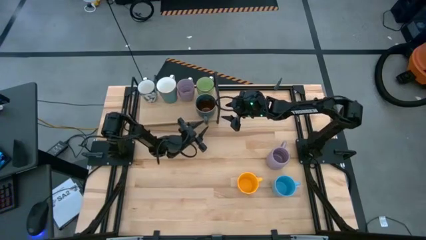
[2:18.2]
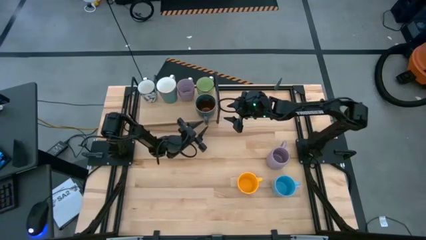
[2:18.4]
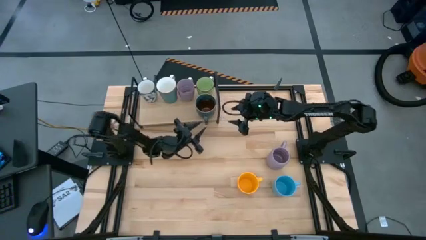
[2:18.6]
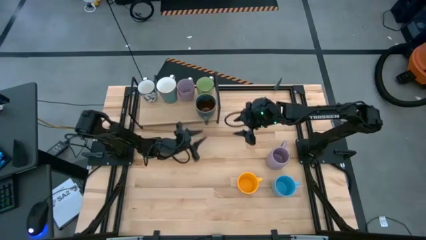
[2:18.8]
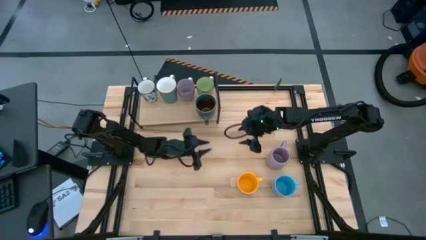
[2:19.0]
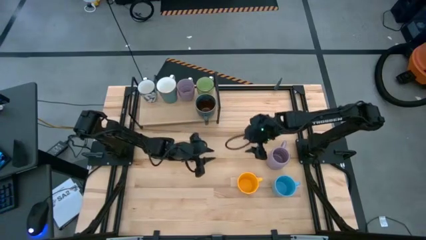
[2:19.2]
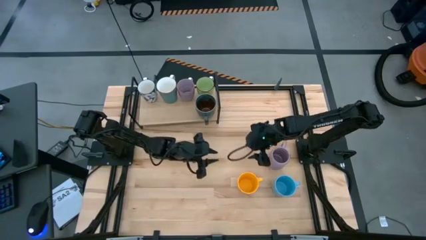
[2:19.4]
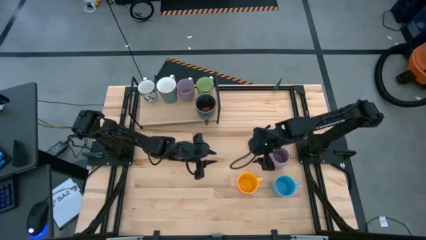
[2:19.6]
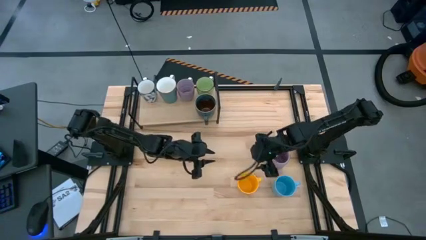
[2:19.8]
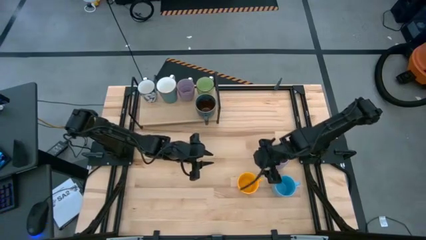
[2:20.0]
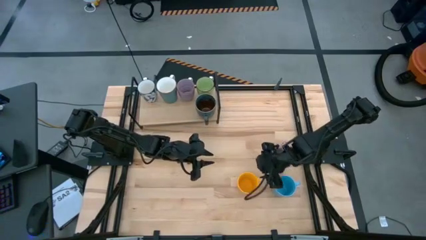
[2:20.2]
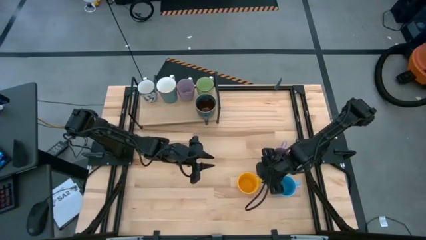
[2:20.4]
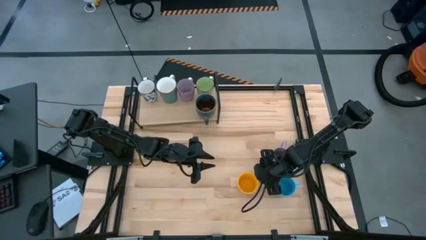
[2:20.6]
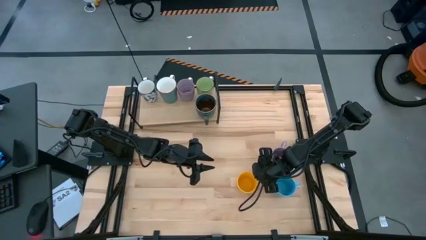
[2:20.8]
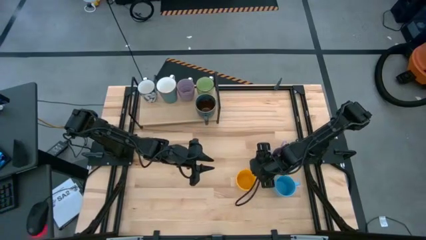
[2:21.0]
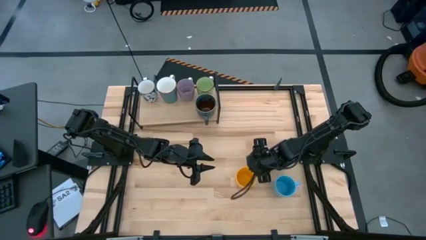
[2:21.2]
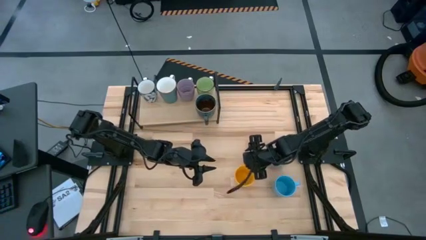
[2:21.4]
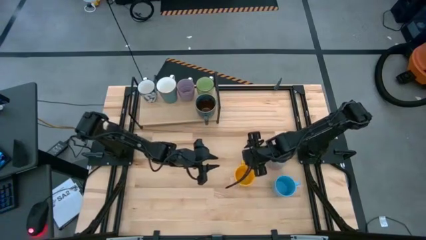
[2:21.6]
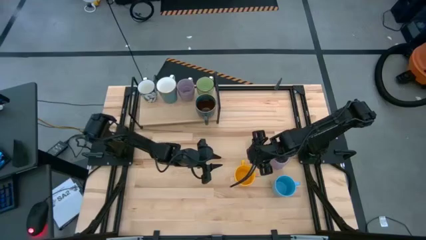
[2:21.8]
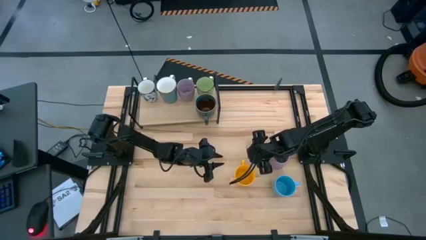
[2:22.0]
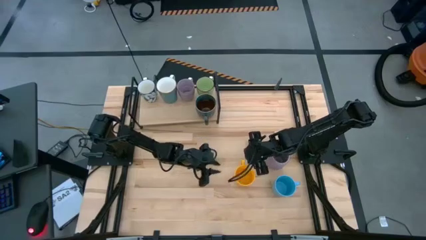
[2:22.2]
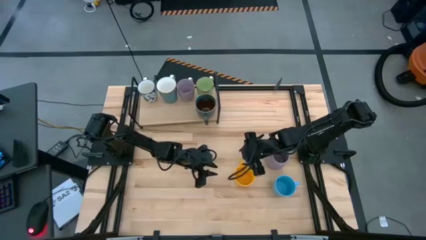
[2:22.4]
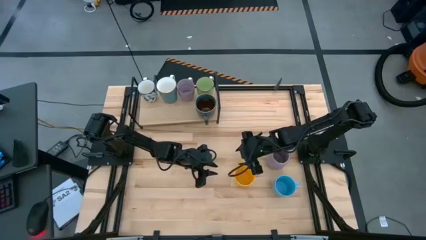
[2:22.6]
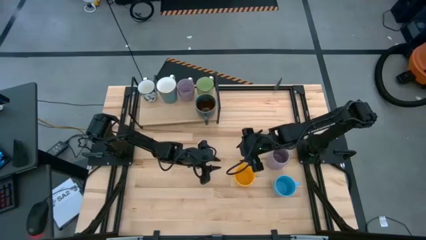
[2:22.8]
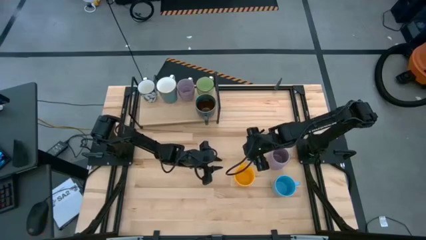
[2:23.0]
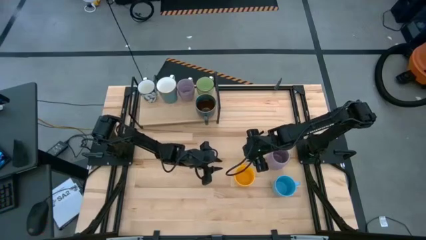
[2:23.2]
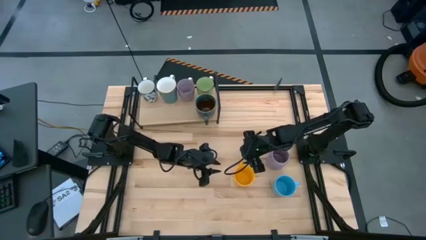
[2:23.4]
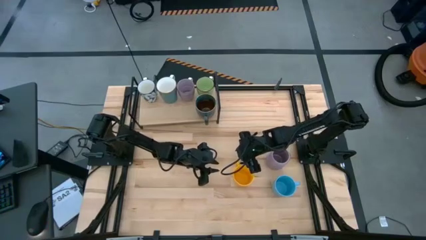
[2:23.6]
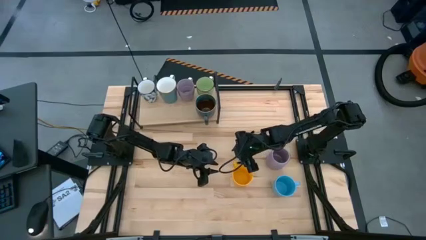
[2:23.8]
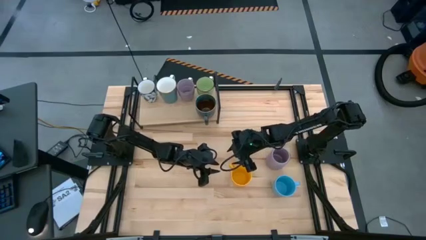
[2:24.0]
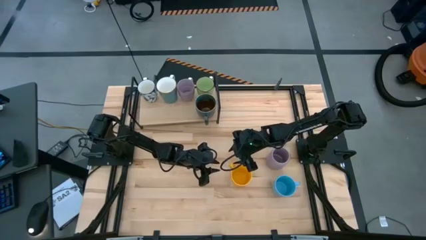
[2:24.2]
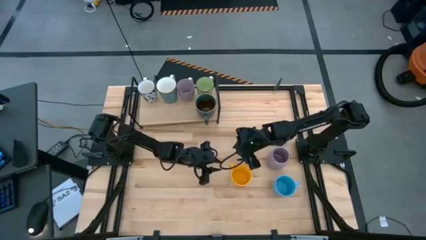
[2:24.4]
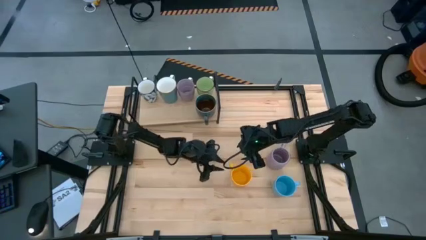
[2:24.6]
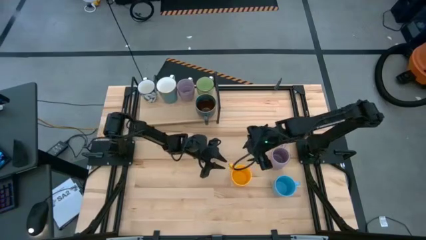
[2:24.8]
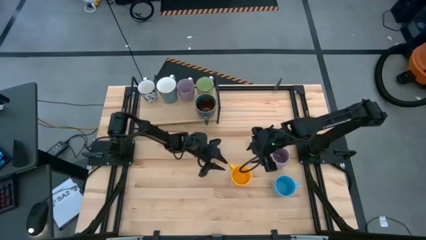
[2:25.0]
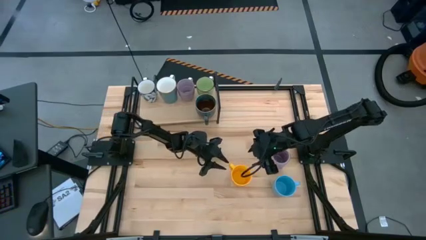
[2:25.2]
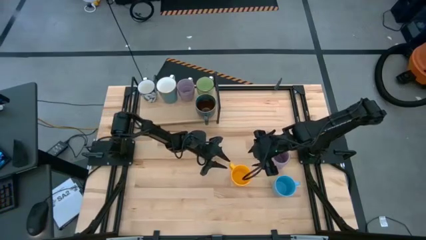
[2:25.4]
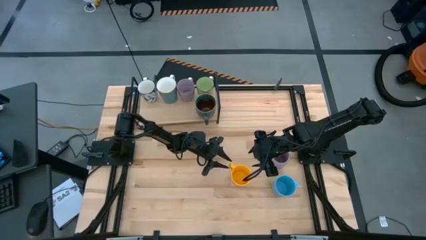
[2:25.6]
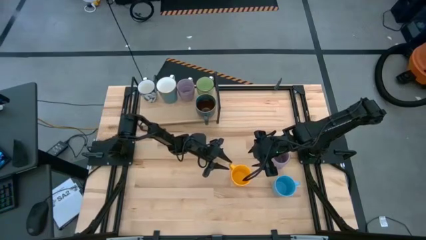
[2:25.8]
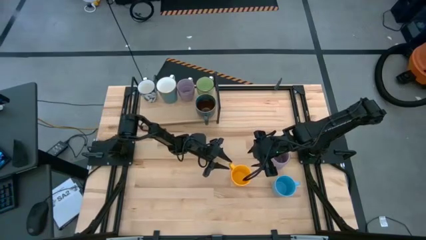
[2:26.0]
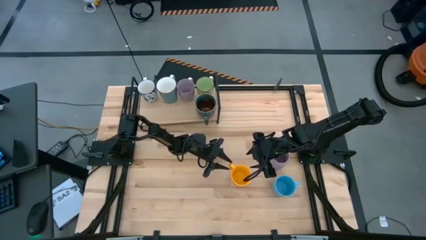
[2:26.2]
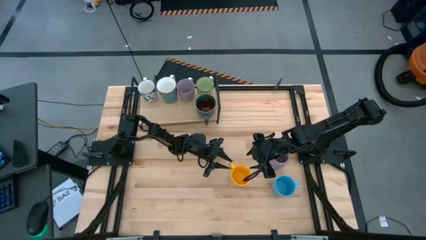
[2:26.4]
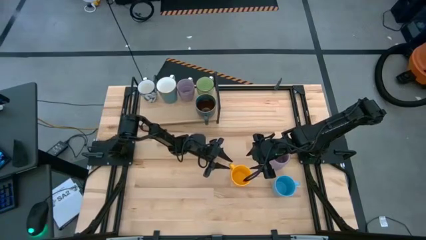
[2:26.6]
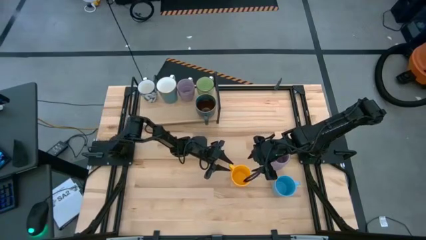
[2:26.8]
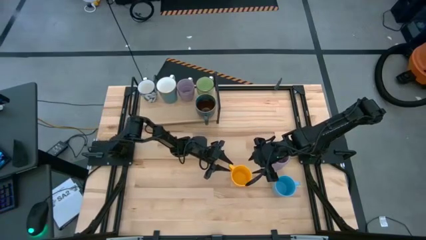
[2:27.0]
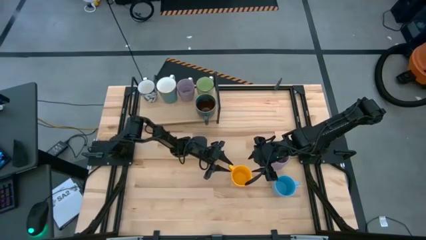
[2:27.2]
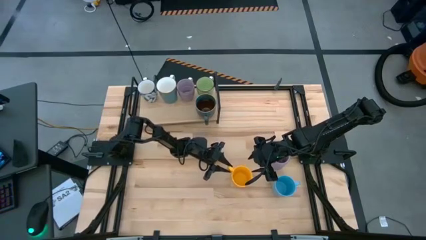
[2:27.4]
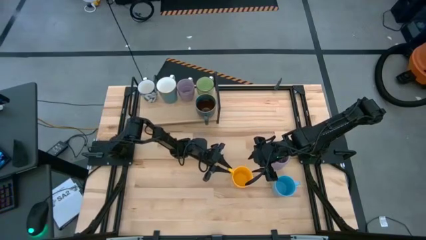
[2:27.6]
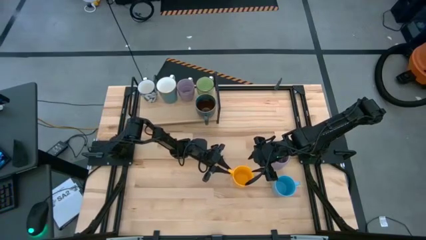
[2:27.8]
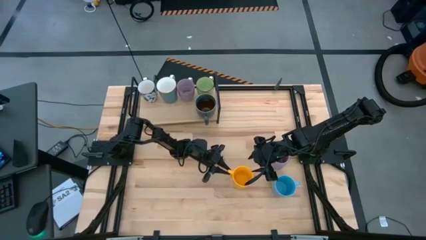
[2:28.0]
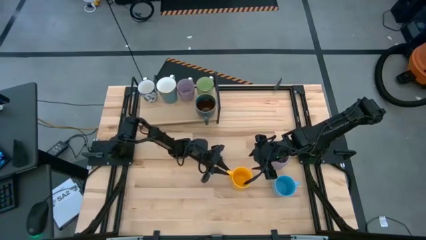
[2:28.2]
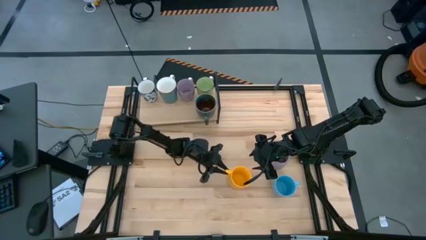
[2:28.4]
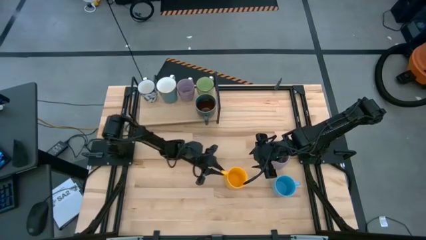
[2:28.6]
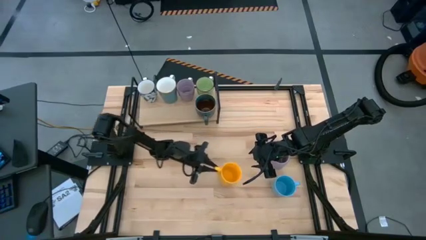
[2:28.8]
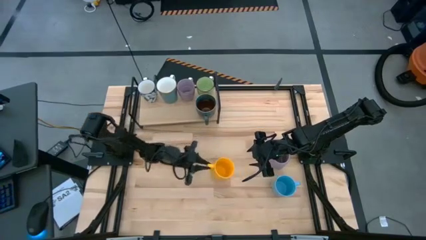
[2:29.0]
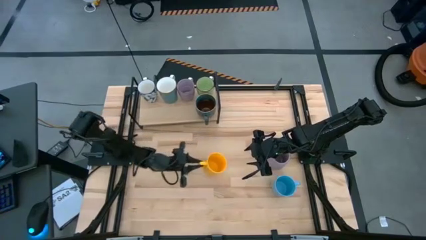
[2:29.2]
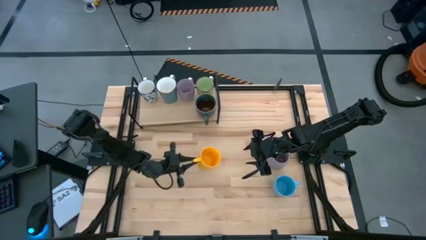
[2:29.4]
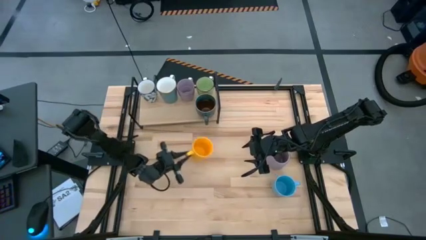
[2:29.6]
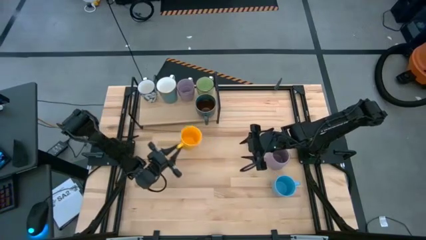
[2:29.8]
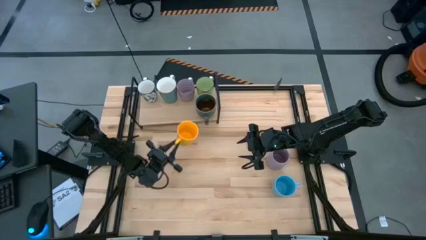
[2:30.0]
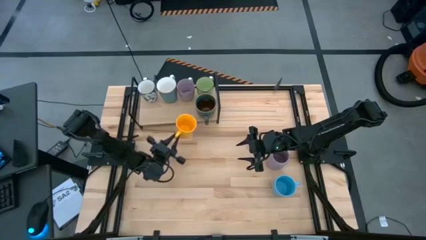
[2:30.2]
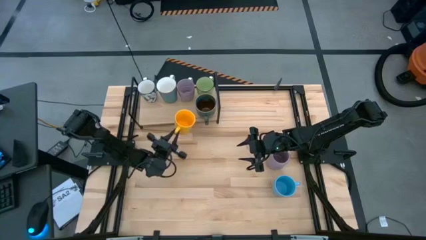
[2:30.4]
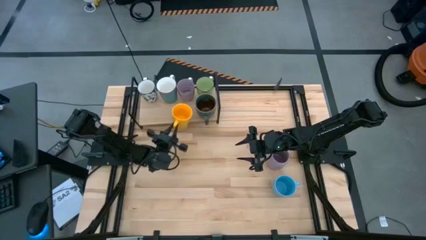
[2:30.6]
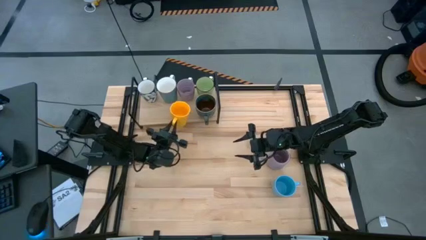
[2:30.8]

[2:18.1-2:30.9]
Task: Place coffee mugs
Put the yellow mug on the shelf

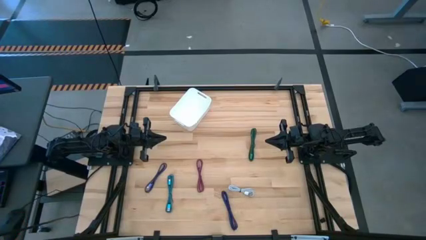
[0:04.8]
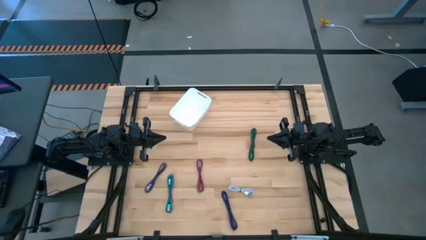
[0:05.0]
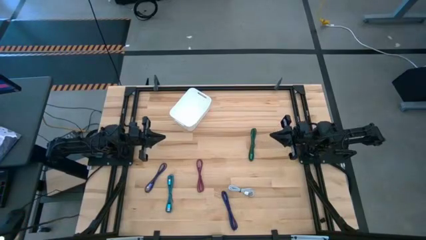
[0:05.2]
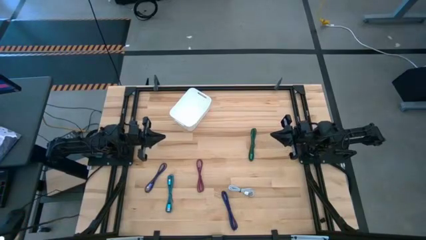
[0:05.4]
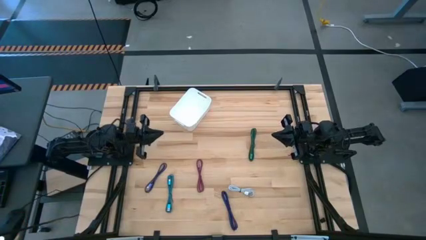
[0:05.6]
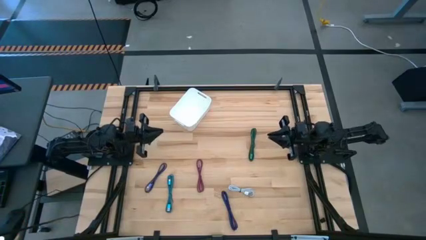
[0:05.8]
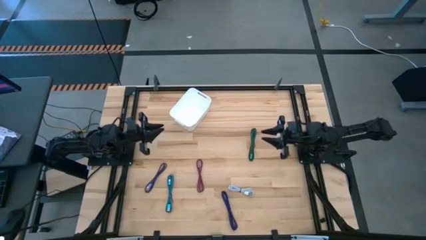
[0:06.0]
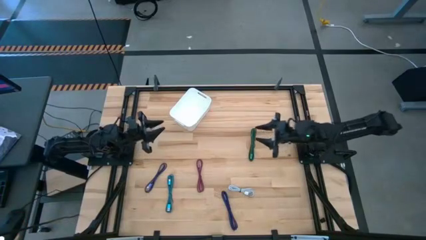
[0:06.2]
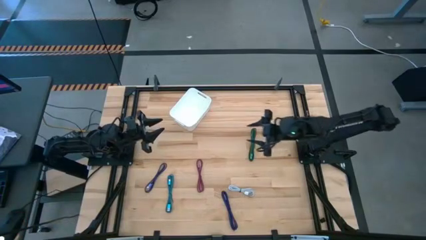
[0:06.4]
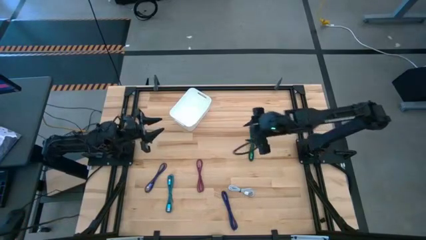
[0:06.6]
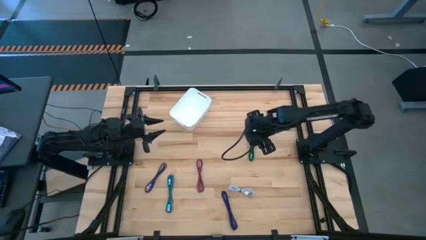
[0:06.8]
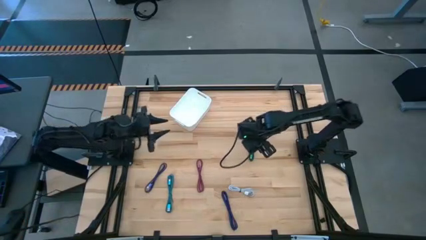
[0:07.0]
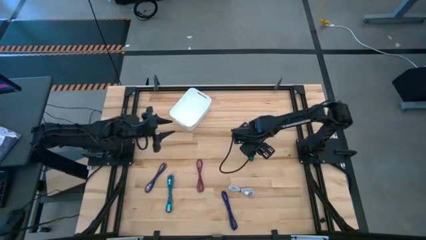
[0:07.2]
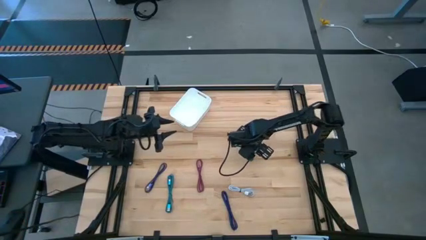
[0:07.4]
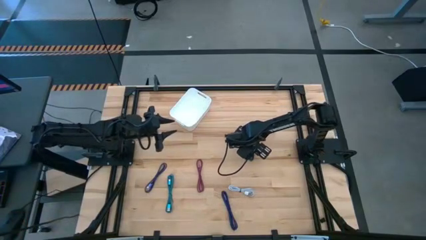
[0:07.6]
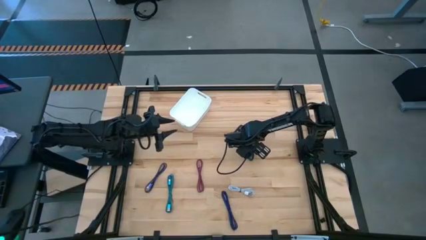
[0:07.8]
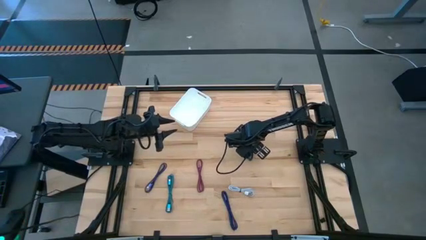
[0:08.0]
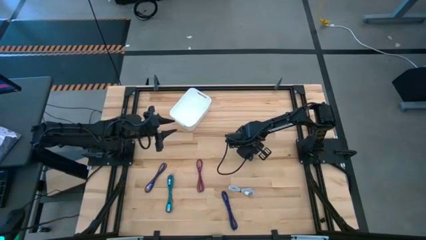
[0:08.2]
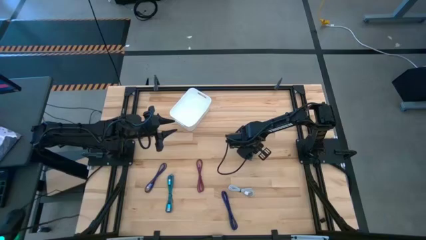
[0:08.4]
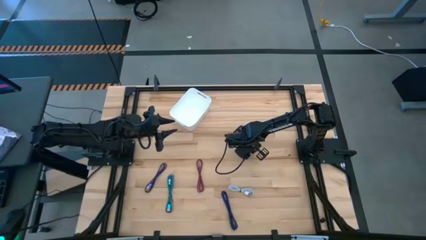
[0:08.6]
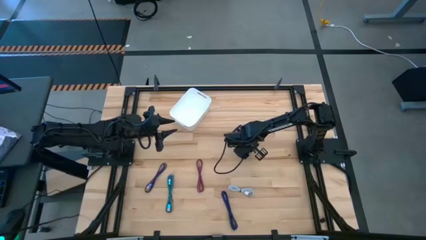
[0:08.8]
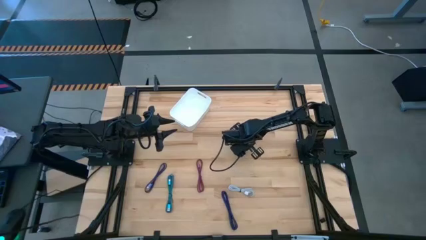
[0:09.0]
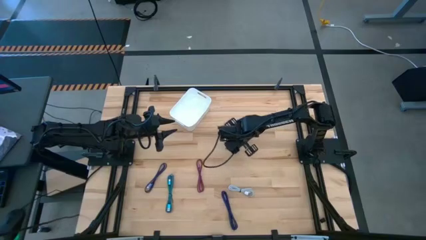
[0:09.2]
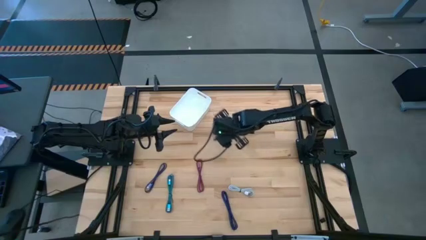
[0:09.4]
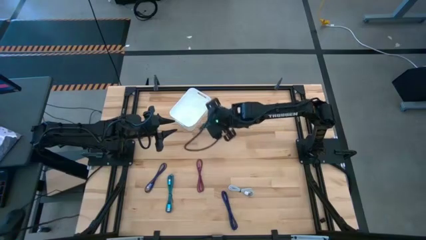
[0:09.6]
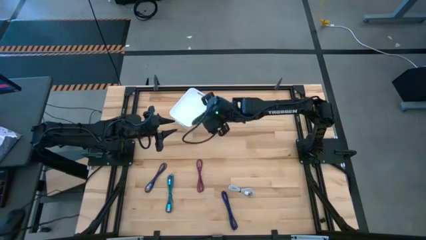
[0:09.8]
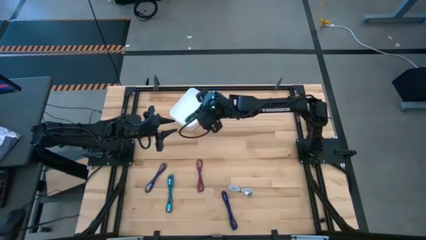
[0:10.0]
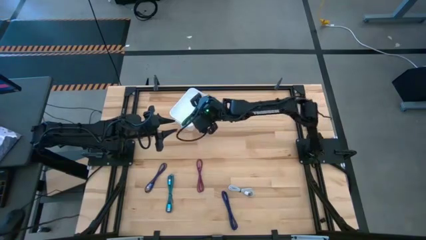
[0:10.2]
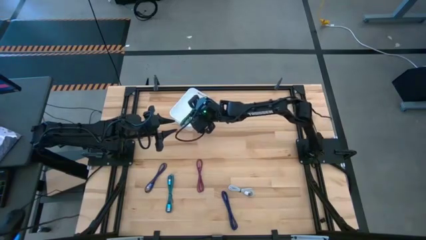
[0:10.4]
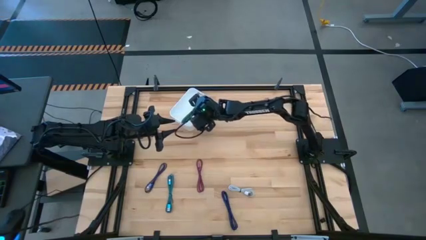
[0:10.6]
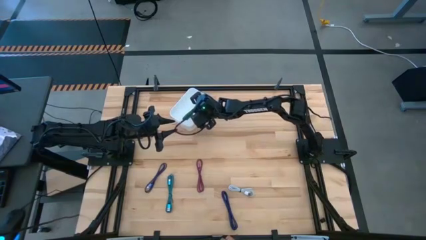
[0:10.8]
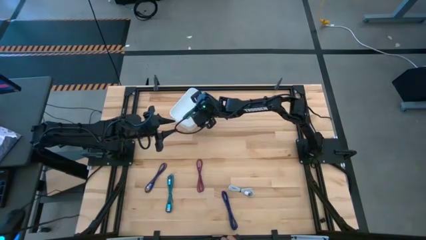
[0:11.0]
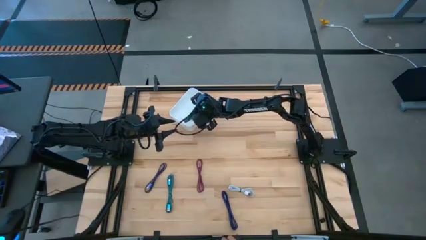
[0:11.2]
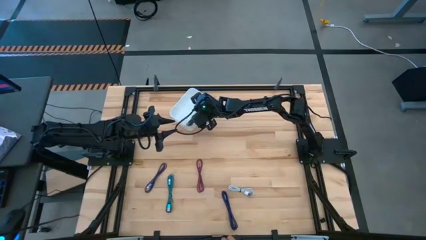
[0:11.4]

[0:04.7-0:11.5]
Task: Pick and place USB-C Cables
Put the green charger cable into the white bin
